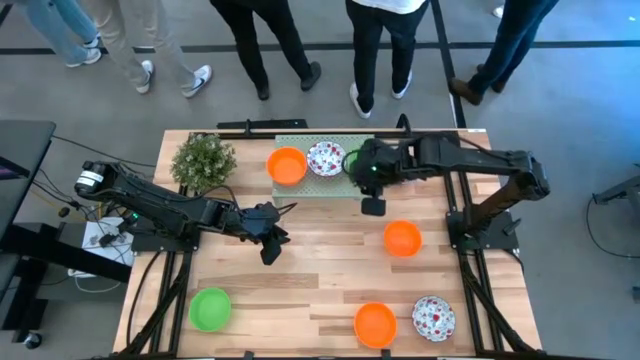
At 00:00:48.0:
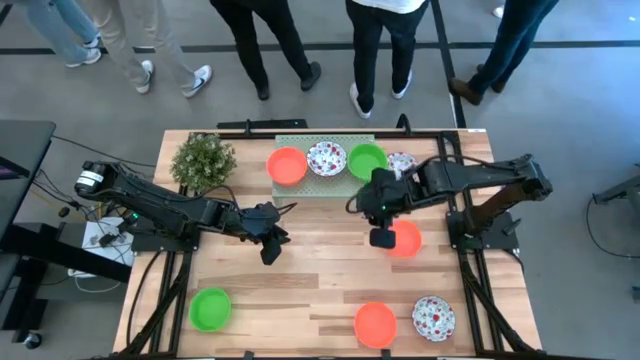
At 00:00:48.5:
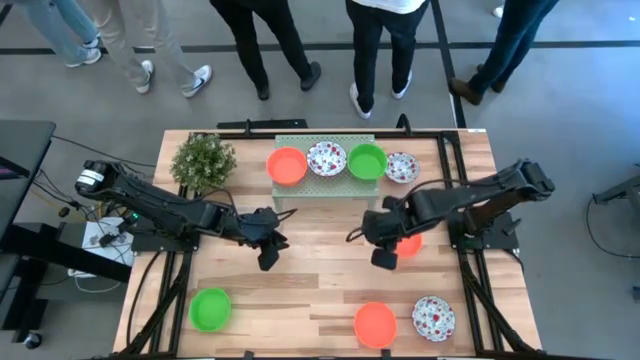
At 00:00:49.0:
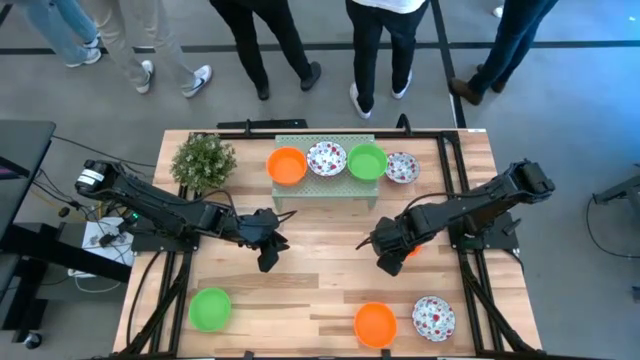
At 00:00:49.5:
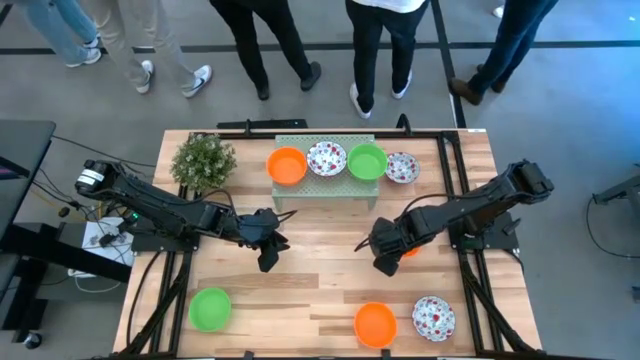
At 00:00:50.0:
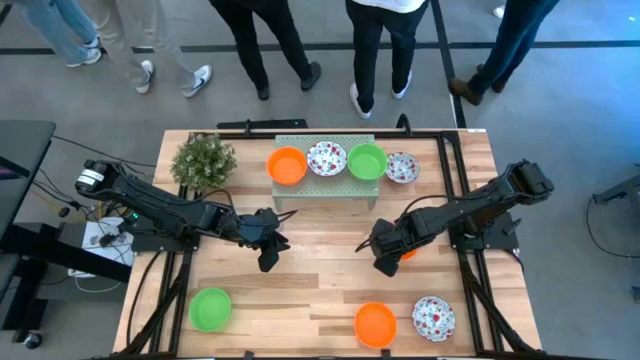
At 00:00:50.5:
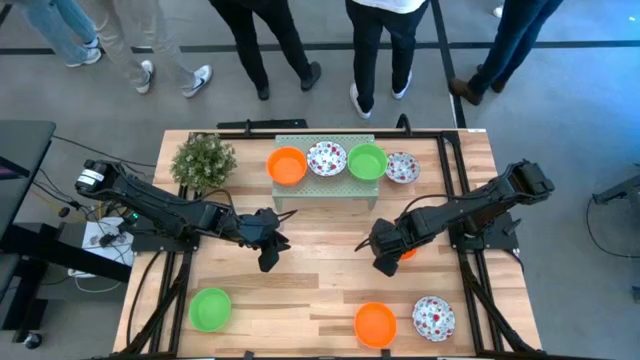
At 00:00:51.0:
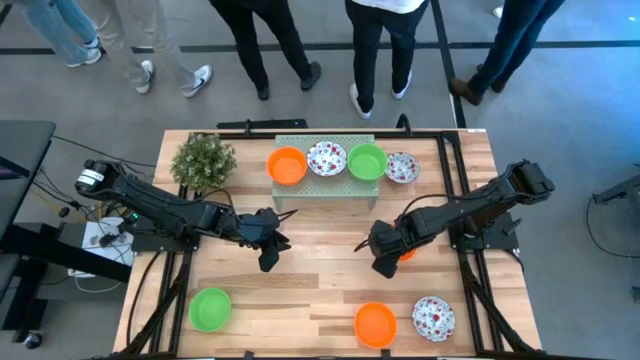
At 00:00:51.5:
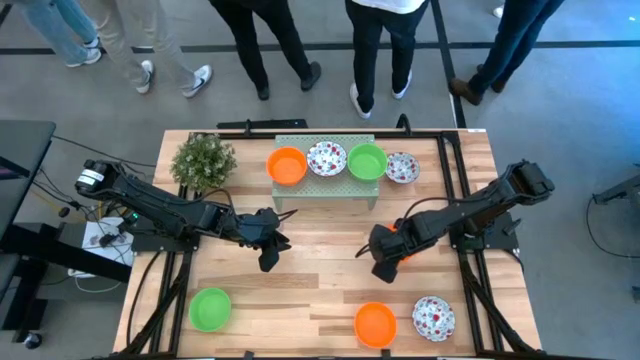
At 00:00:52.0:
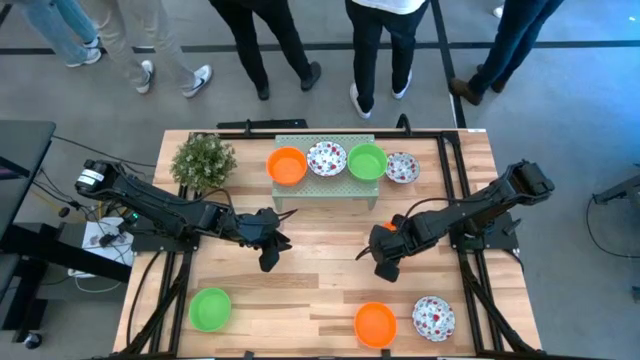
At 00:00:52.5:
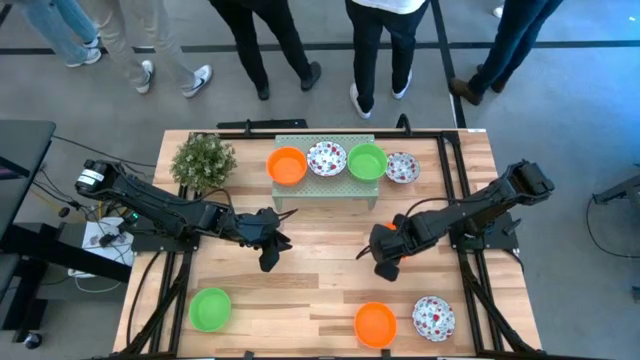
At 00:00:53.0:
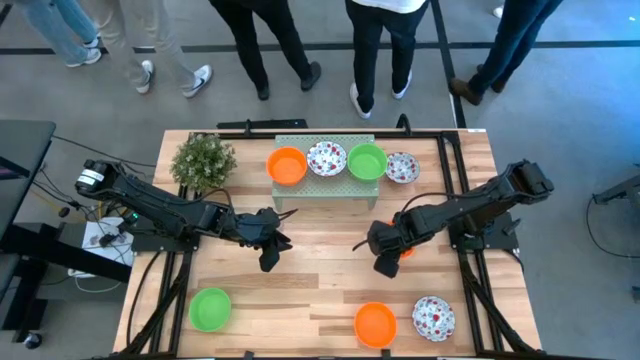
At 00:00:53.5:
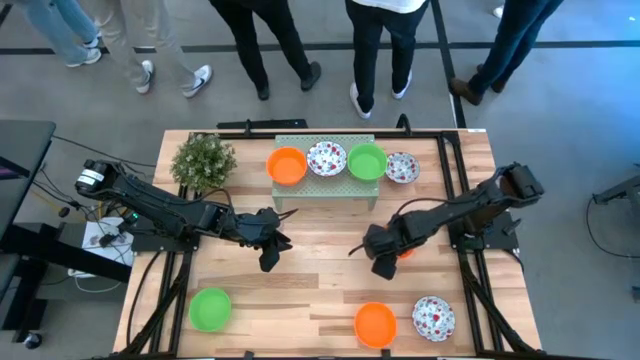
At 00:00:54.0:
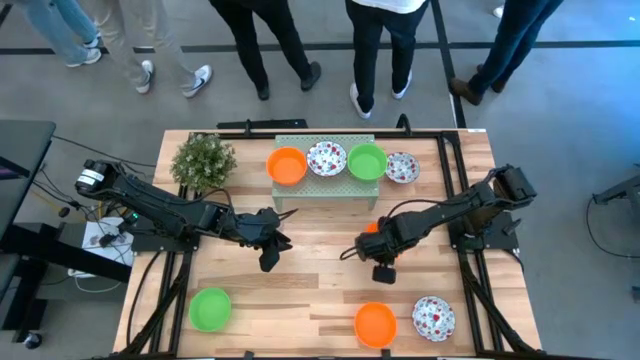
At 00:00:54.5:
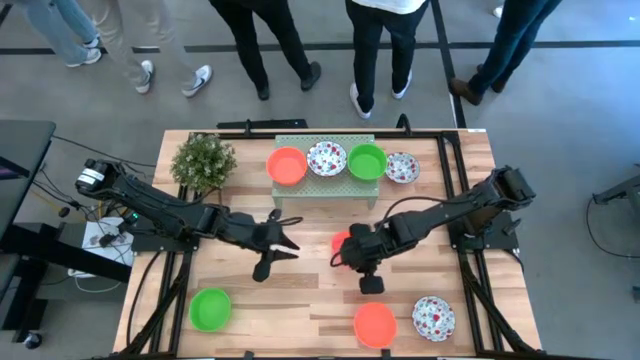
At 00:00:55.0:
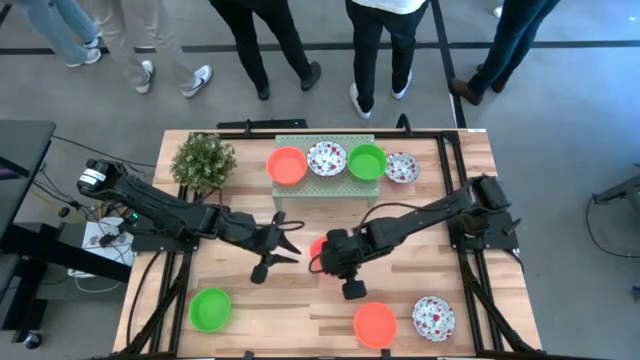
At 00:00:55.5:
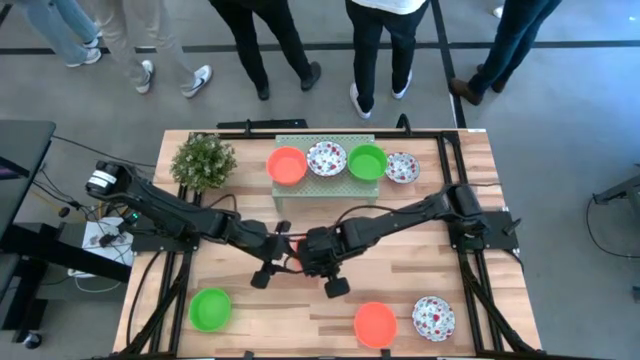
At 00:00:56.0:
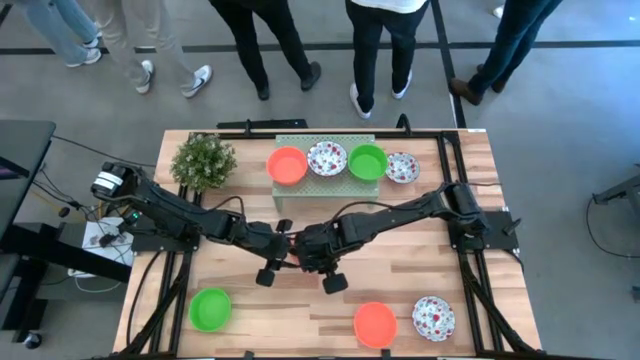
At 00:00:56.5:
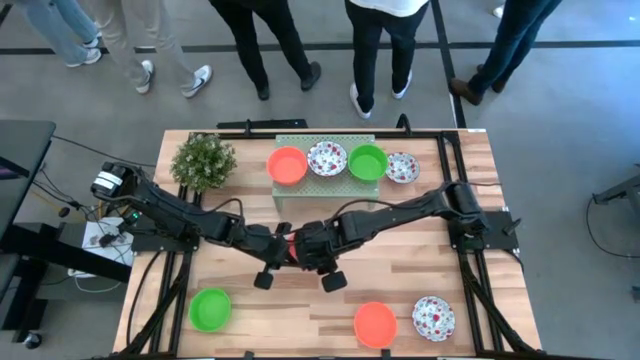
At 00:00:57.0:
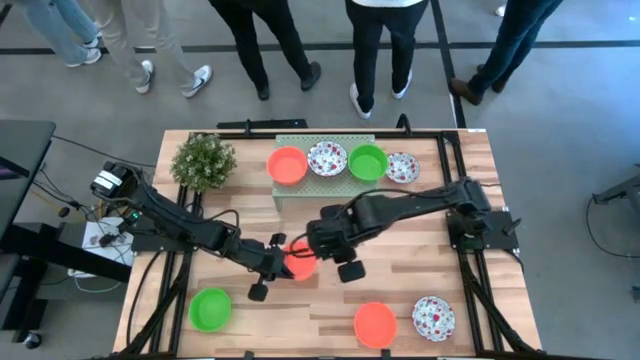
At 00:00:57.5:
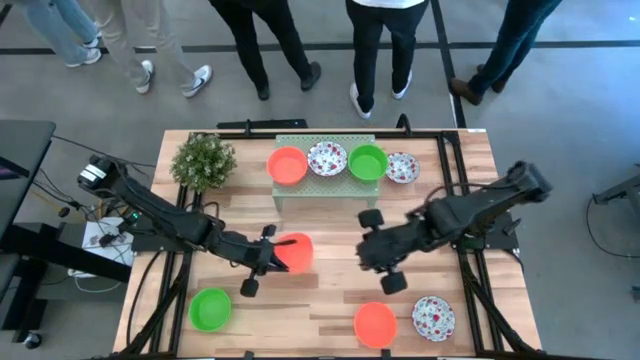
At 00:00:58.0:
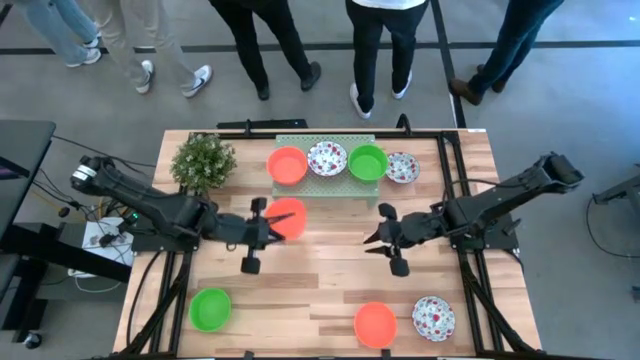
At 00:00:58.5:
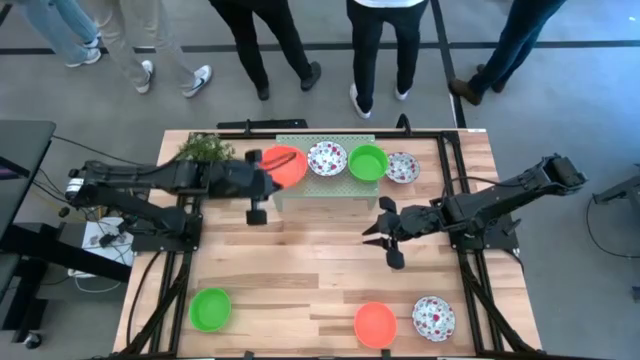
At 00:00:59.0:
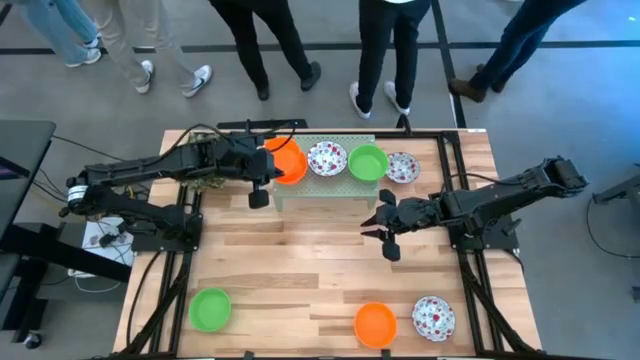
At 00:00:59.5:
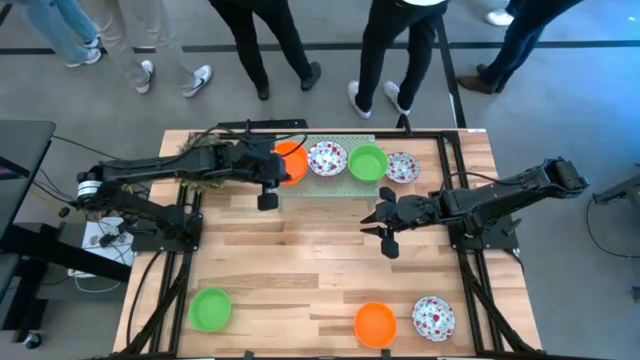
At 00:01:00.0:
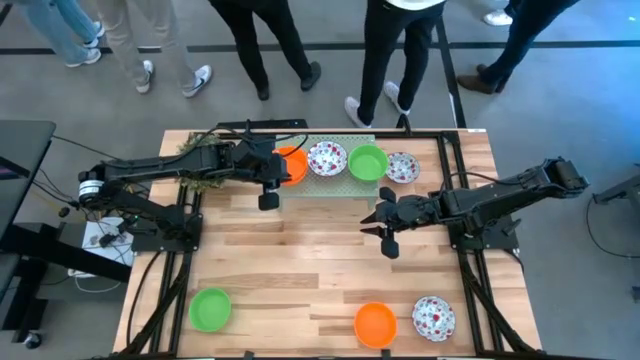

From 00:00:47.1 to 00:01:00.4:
Task: Pick & Place Mini bowls
Stack the orange bowl onto the stacked orange bowls on the shelf

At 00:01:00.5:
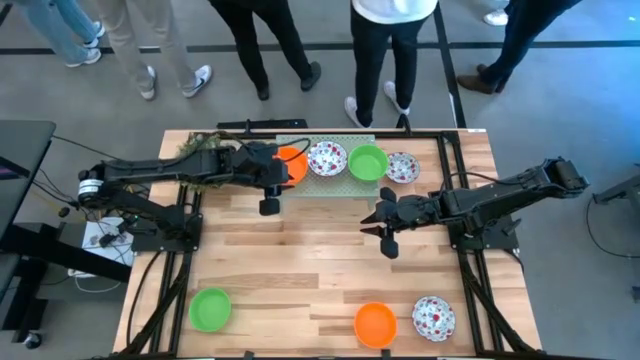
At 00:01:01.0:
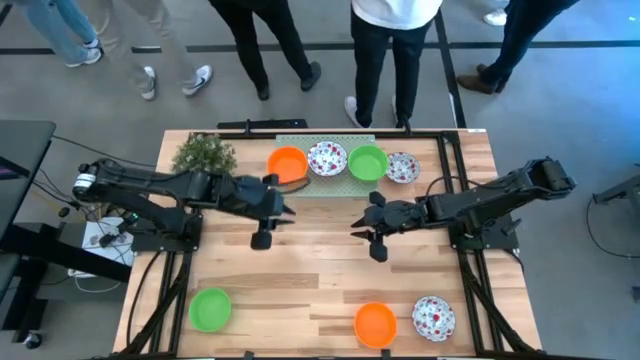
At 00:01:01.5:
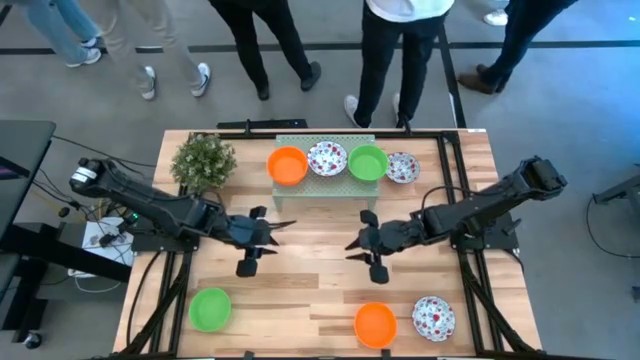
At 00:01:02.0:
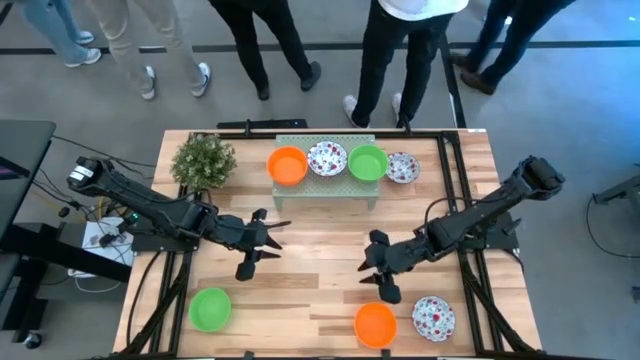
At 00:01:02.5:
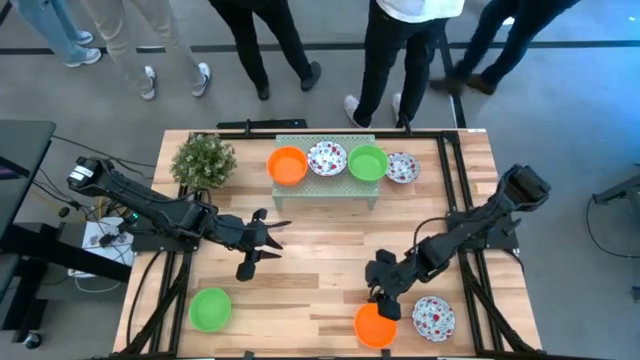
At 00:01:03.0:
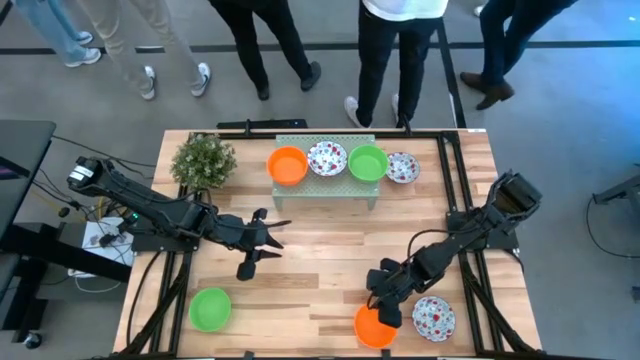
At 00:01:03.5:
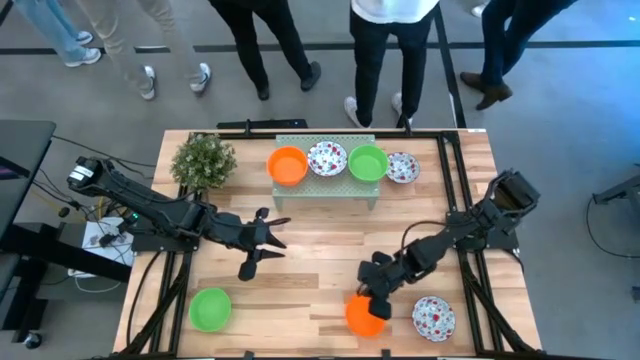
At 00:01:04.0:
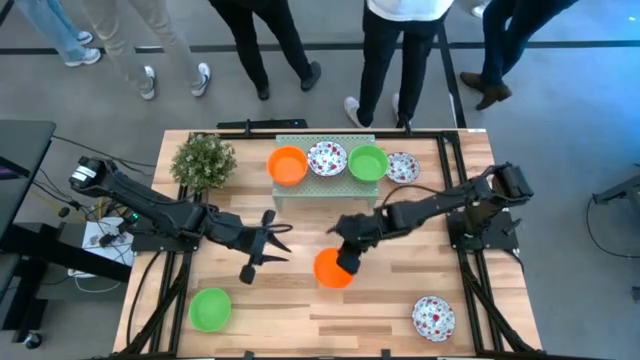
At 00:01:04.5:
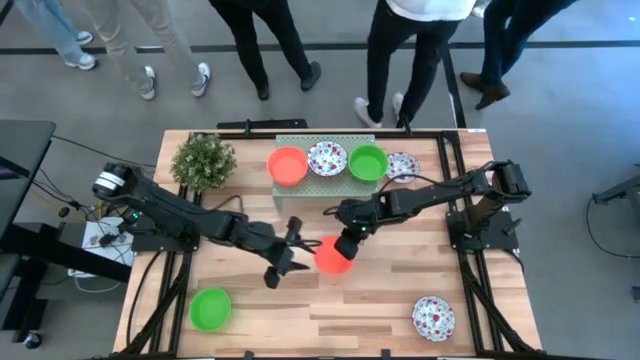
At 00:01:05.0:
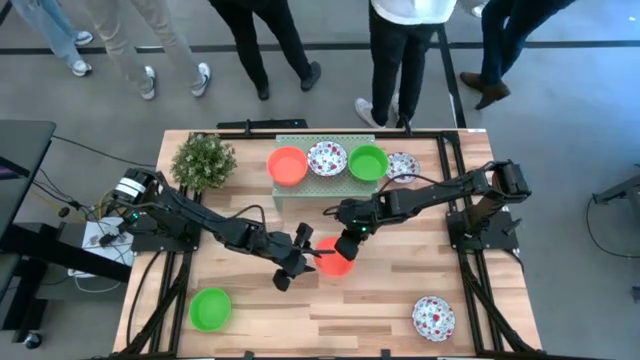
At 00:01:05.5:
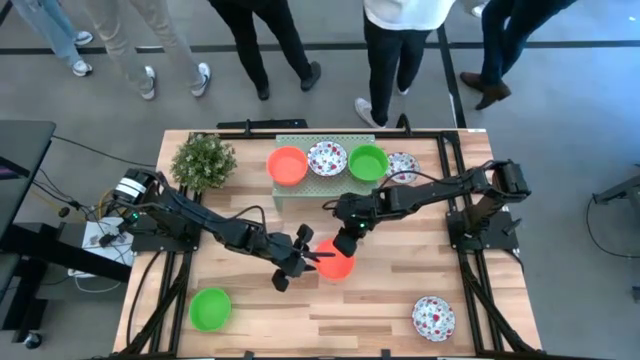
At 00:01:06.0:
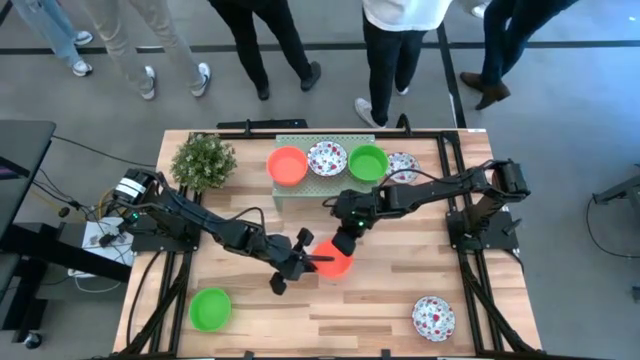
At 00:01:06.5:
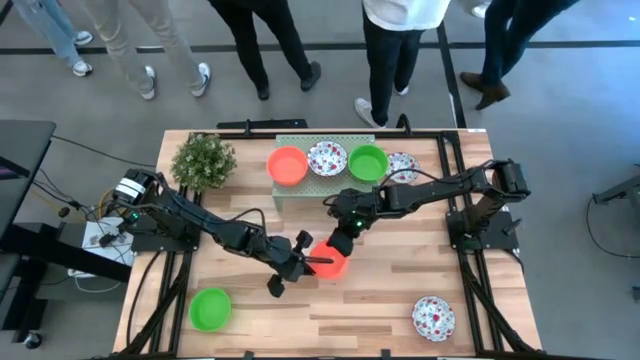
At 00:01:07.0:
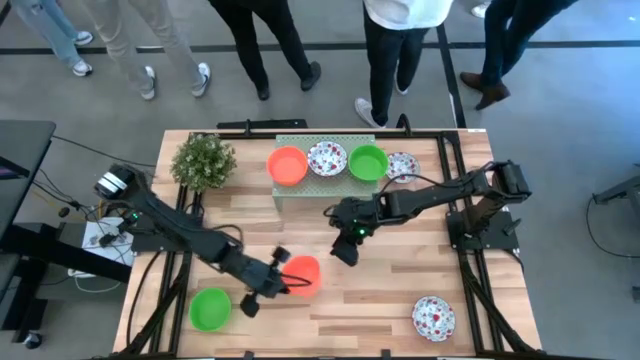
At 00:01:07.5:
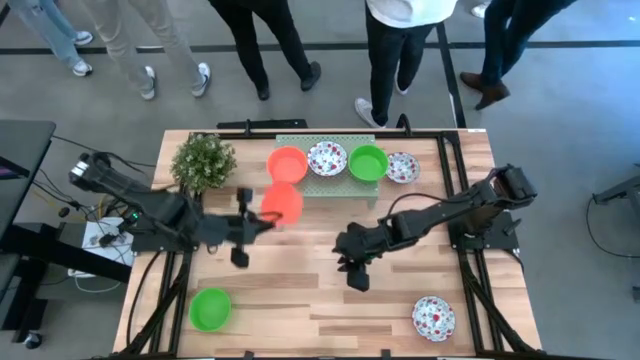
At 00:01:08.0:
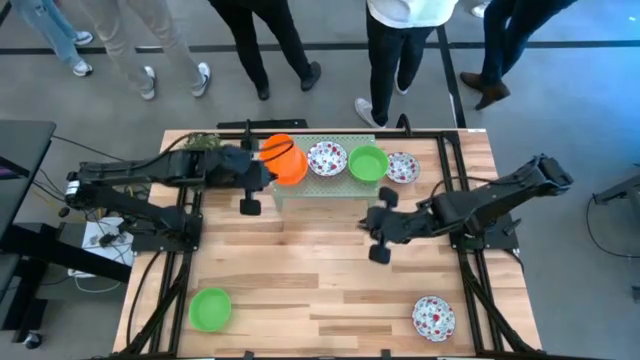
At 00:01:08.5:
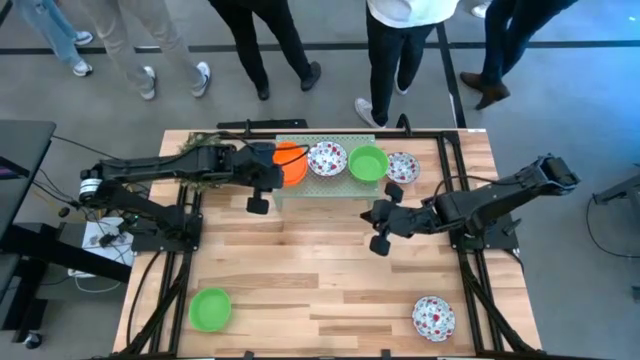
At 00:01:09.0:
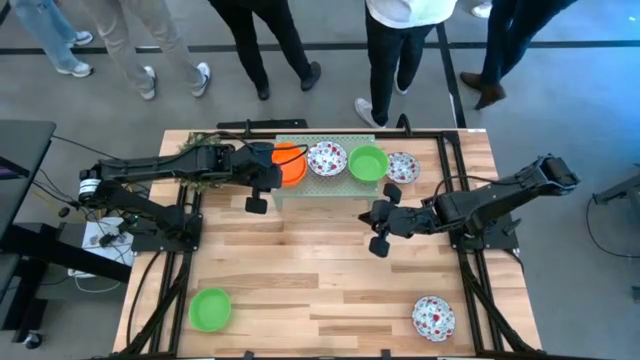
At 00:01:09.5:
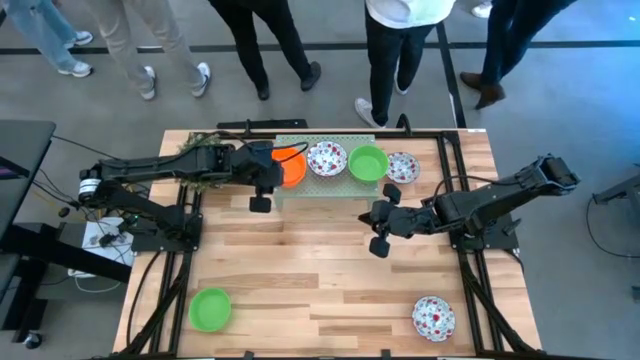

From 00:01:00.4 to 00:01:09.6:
Stack the orange bowl onto the stacked orange bowls on the shelf
